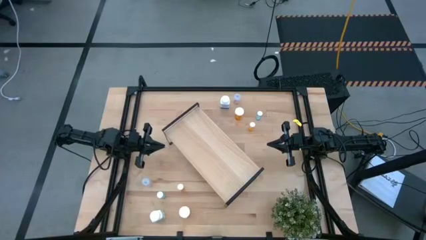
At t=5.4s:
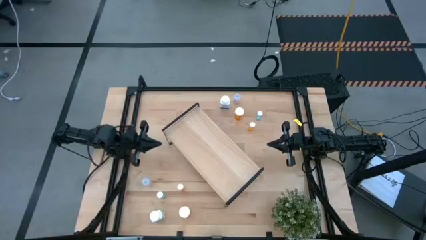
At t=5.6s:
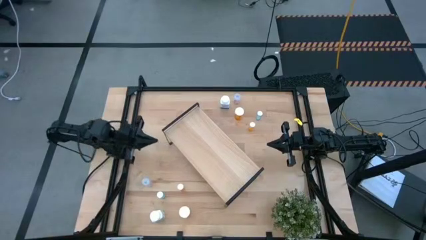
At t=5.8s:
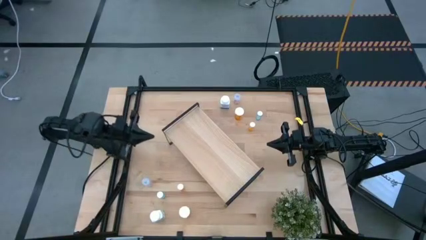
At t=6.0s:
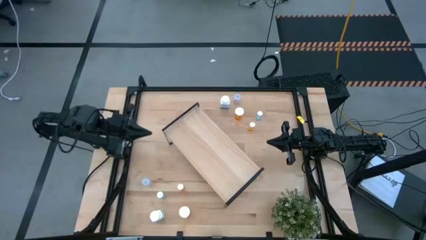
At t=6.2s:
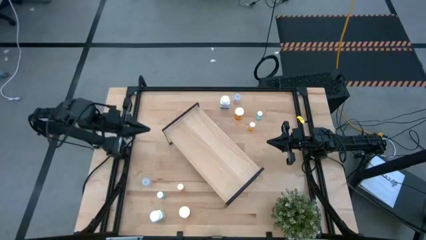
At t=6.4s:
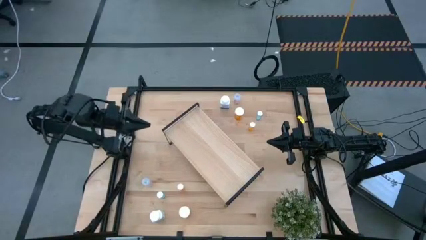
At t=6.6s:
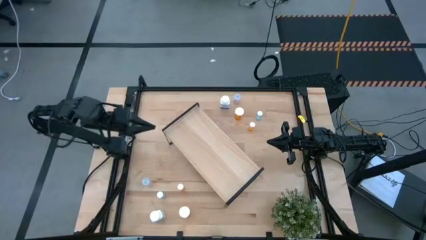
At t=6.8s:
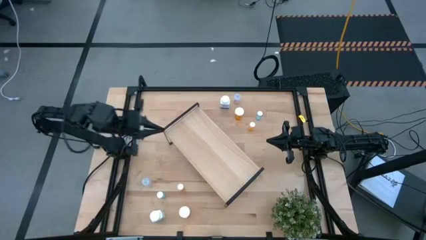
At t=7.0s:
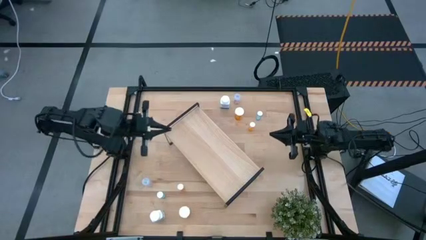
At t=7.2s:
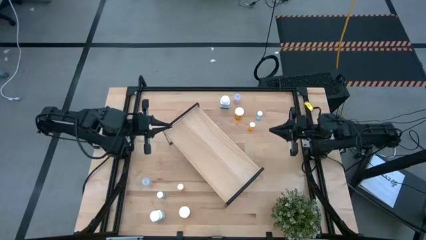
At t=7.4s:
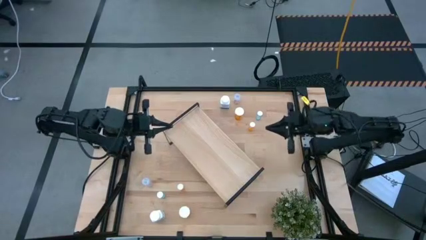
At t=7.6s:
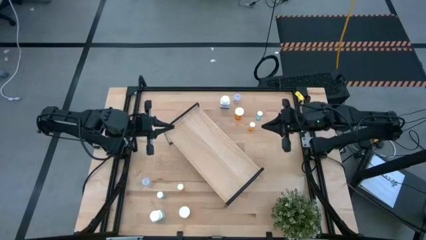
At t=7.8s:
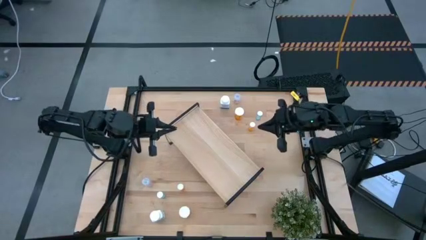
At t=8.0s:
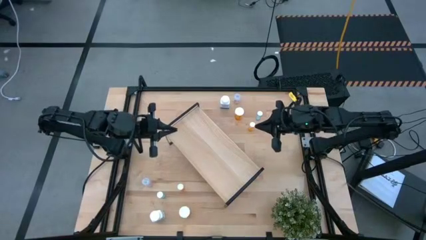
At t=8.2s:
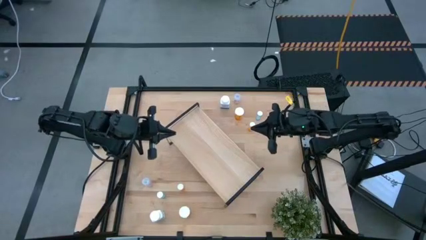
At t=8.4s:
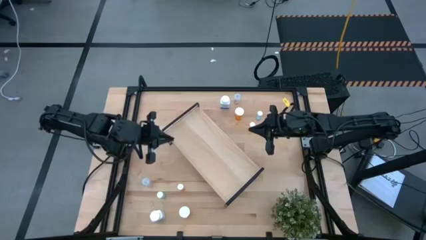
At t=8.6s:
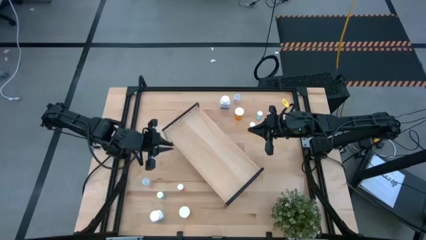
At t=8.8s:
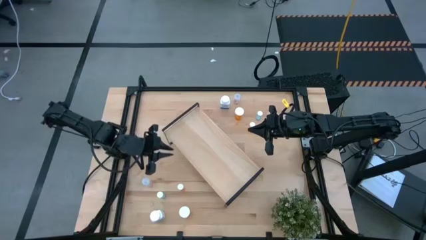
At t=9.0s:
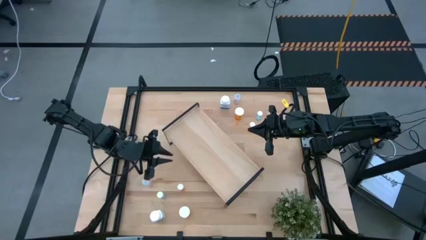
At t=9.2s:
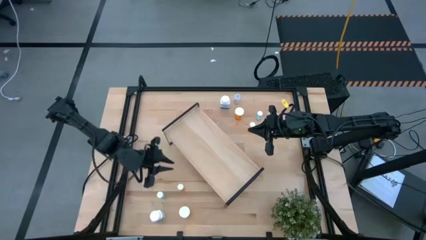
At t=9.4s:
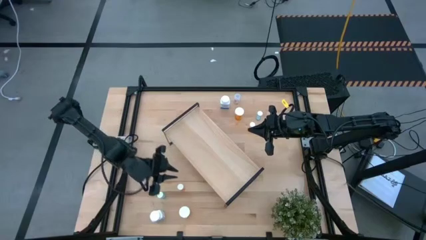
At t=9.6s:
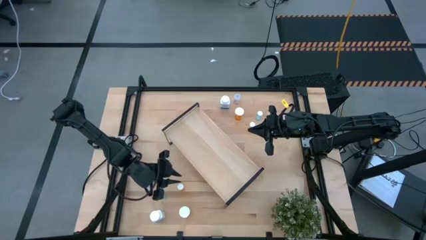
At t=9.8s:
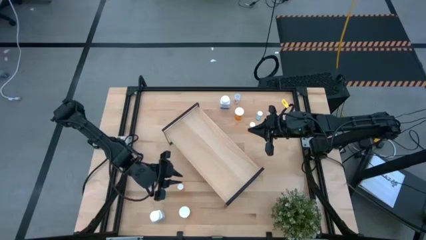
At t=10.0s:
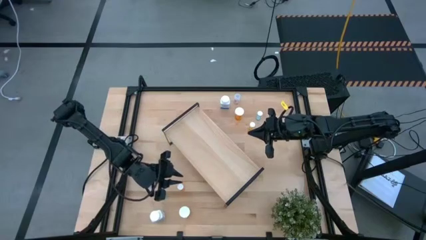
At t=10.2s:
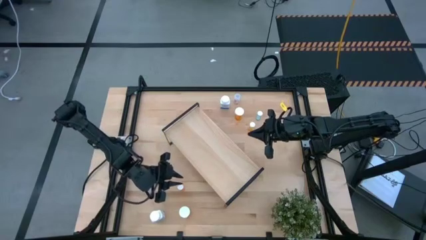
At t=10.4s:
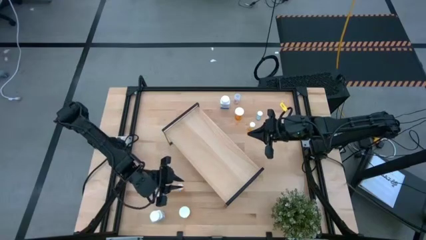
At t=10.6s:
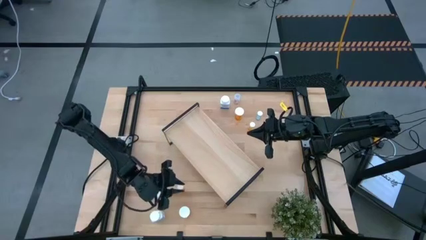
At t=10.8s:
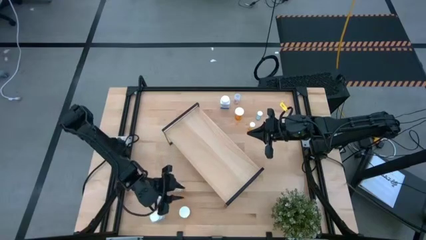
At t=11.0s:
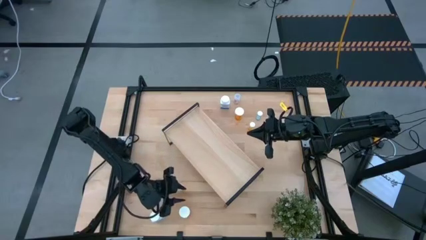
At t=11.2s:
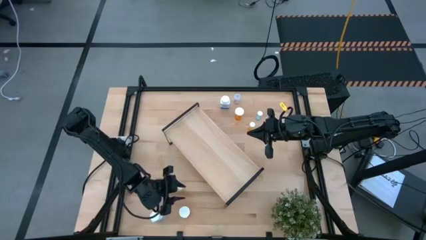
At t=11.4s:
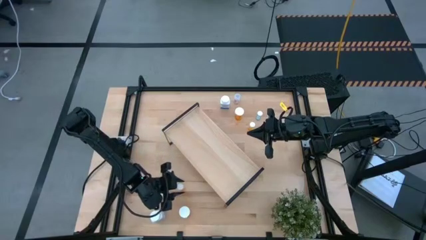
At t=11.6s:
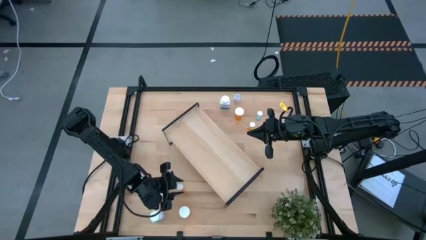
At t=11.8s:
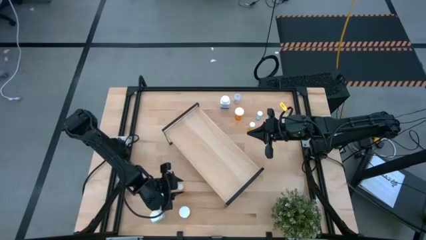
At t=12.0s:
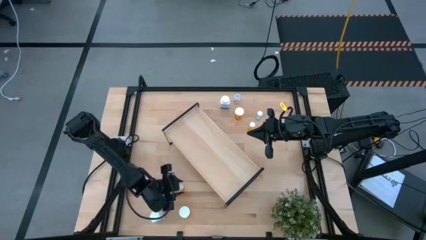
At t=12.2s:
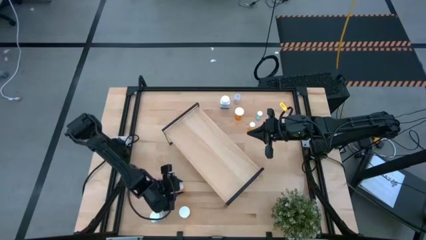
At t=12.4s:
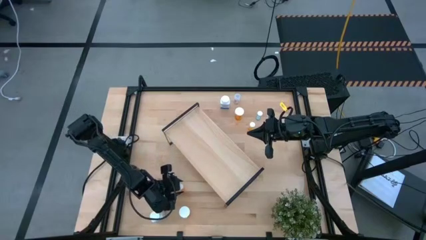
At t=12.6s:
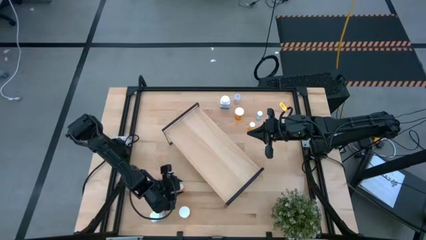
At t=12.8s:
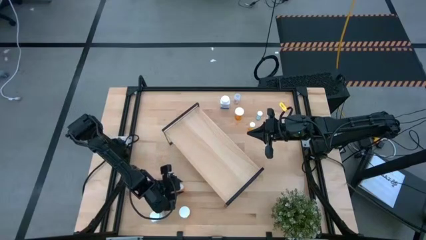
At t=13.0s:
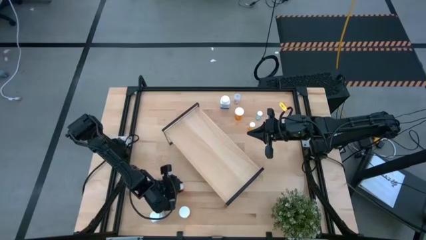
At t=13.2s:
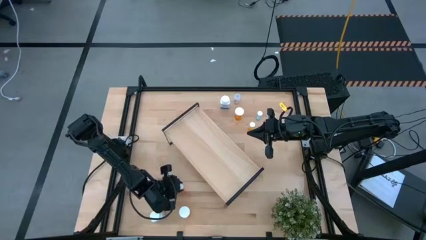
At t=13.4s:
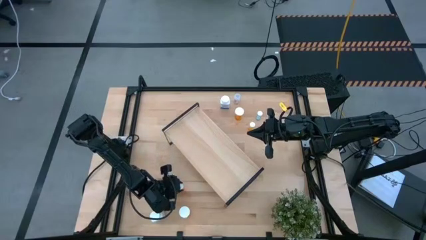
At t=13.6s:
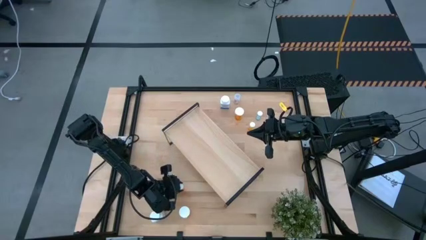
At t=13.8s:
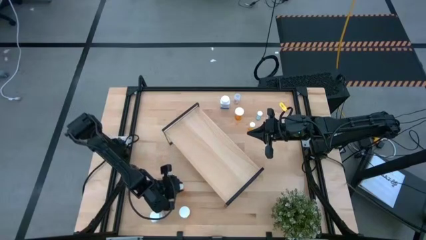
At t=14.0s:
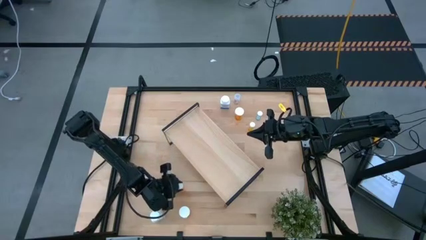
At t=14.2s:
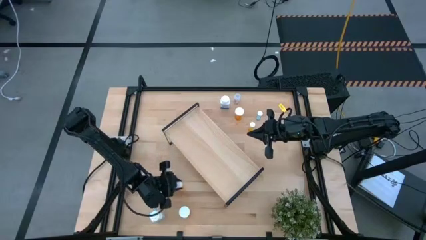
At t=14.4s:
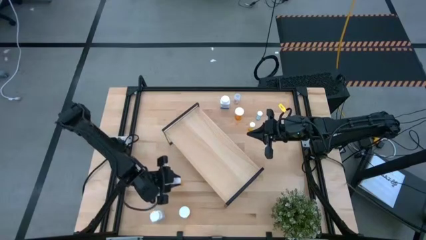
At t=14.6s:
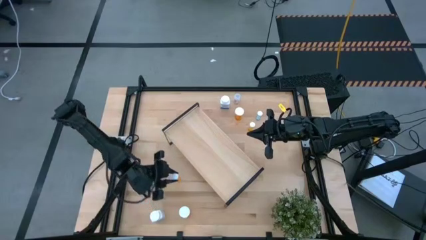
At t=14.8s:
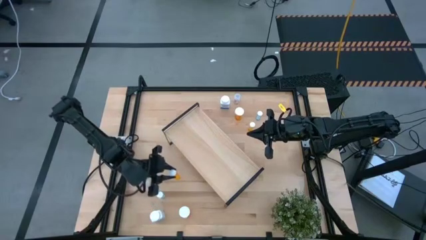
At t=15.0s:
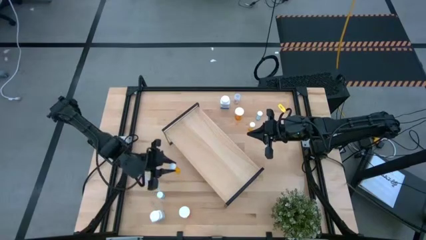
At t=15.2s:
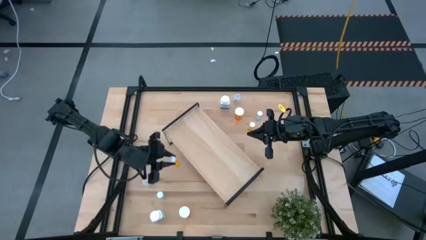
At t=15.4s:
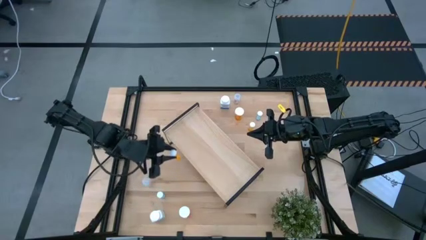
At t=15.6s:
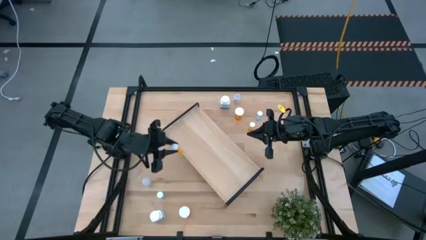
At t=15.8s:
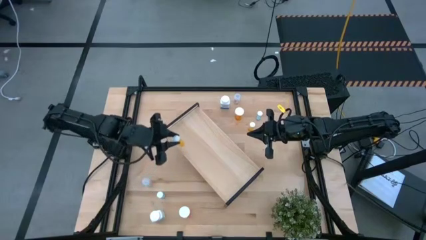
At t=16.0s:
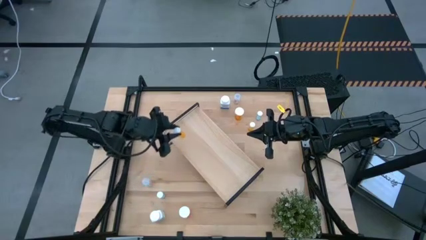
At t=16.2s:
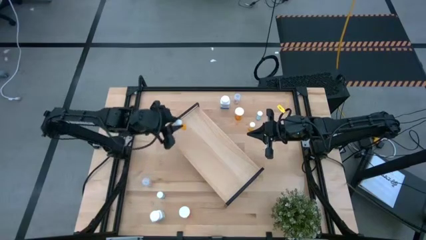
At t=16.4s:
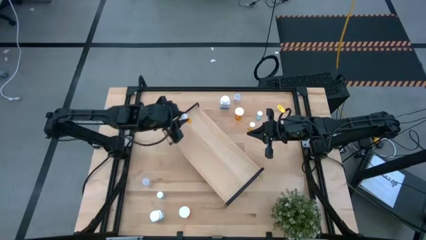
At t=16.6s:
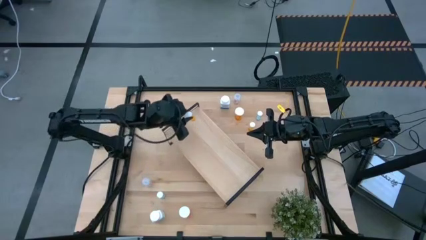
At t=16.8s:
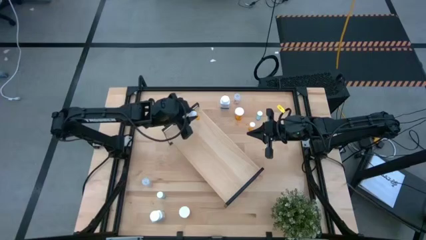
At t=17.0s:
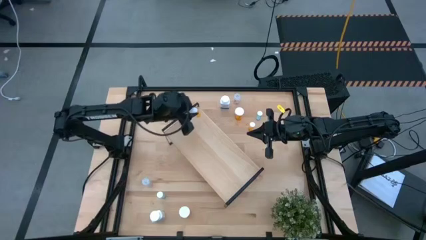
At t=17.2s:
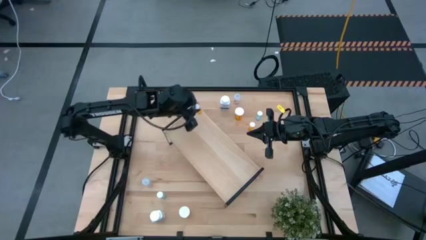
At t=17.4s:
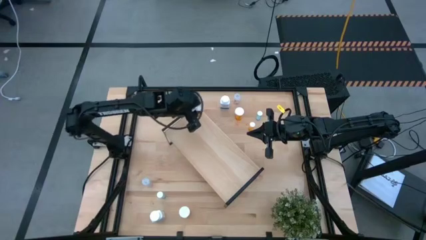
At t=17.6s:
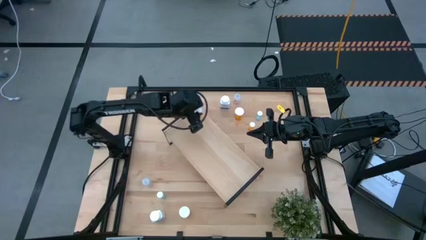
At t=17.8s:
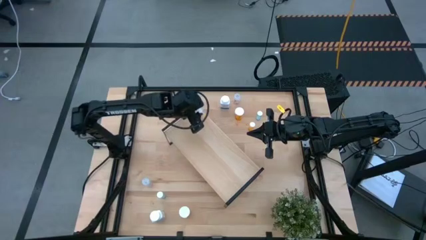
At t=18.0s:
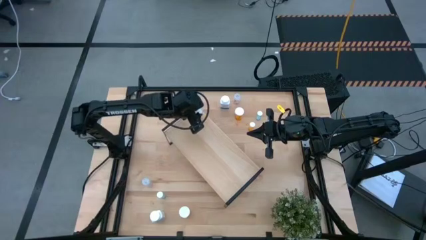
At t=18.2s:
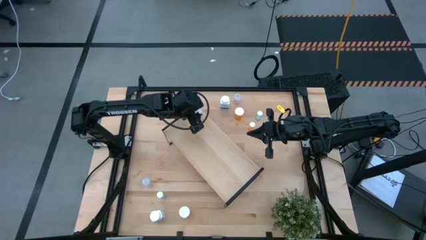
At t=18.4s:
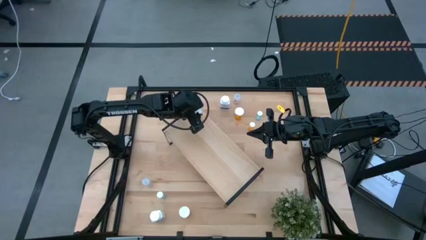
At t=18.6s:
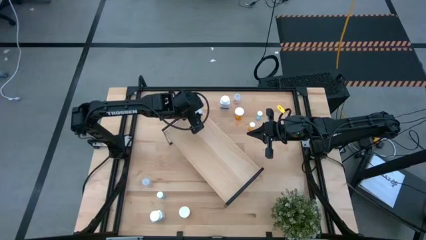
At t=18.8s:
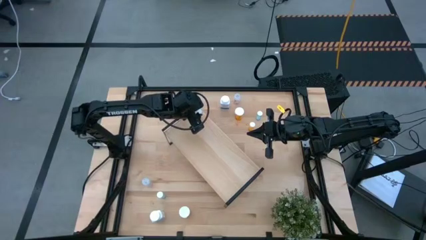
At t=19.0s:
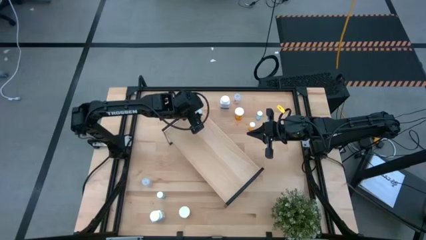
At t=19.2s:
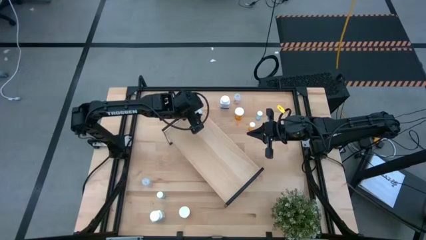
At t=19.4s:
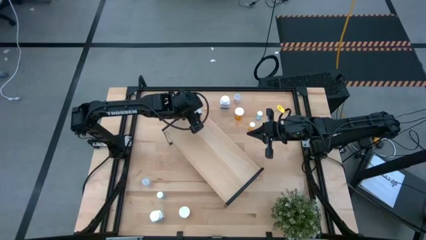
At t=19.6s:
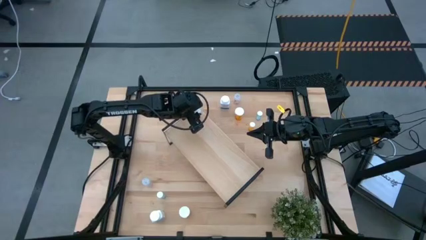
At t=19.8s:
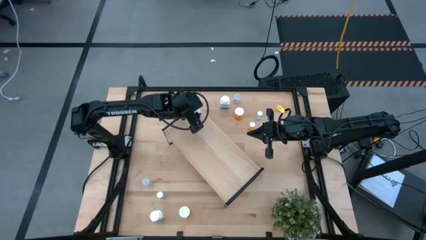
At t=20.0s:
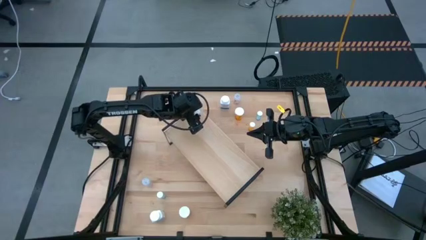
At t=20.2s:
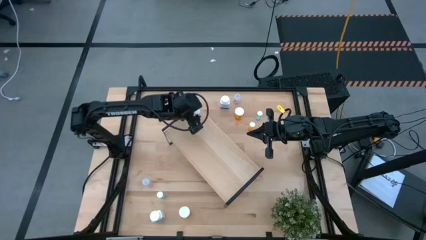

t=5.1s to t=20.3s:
Task: Pick and place medicine bottles onto shelf by color
Put the bottom small orange pill bottle on the shelf
